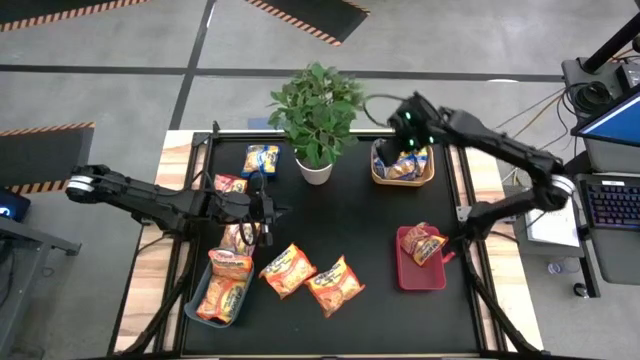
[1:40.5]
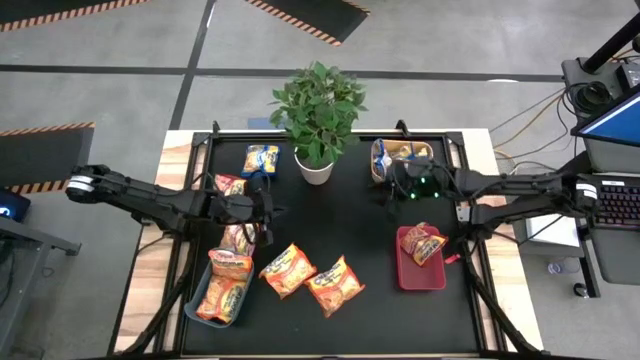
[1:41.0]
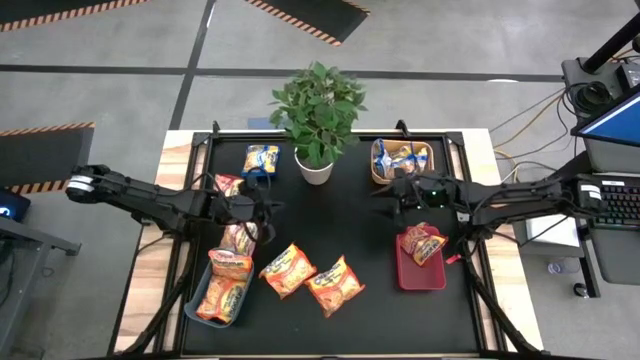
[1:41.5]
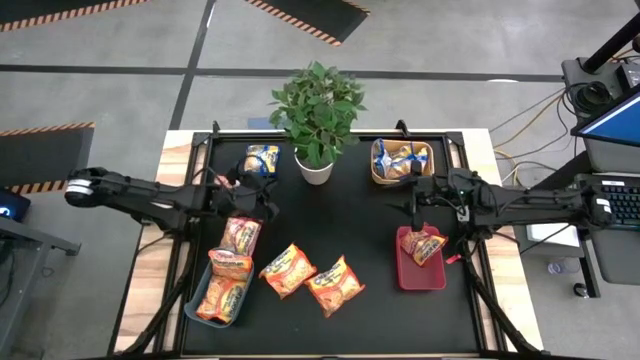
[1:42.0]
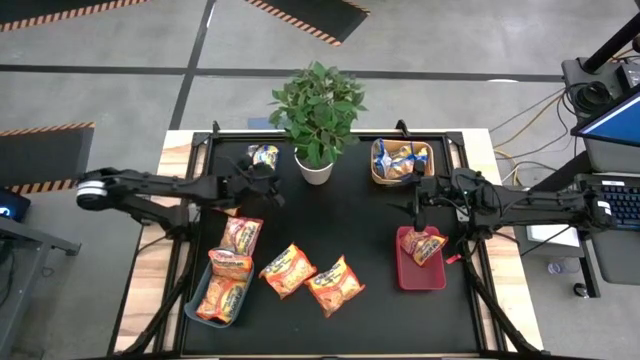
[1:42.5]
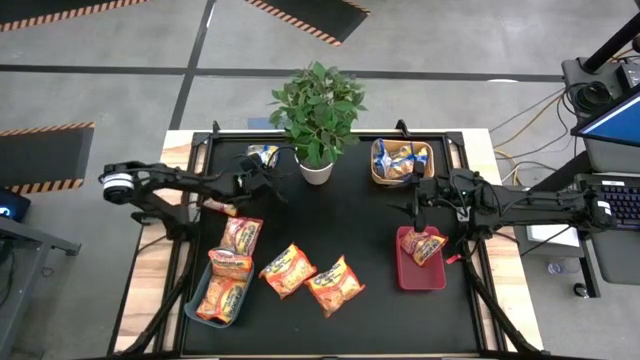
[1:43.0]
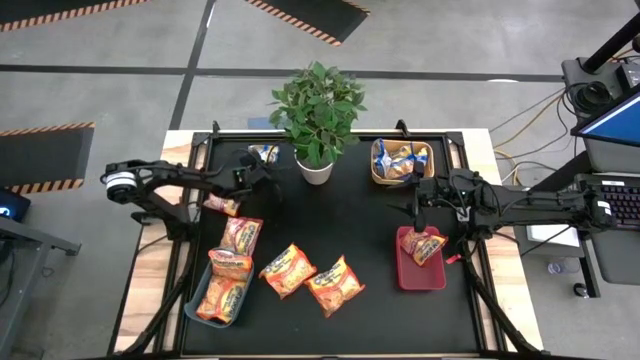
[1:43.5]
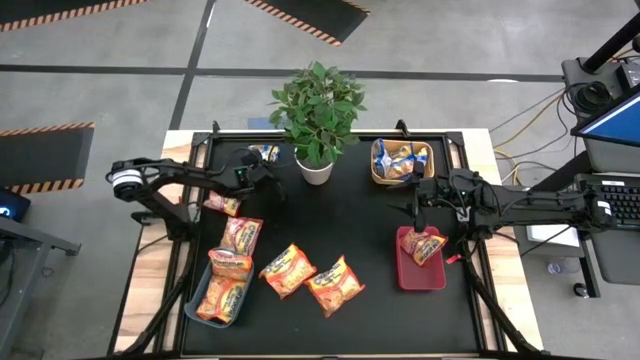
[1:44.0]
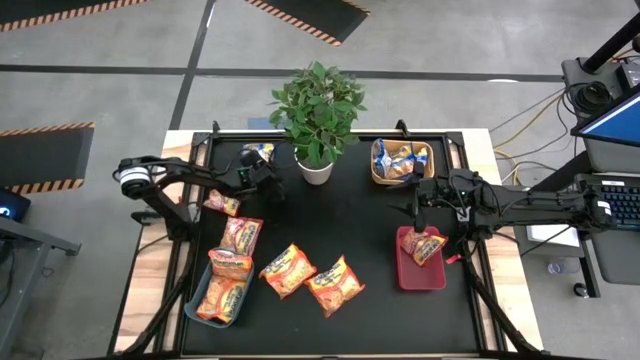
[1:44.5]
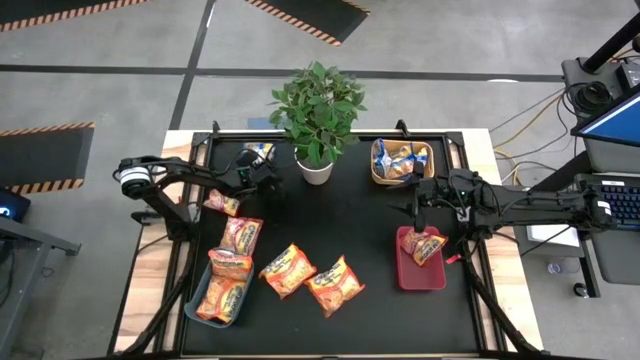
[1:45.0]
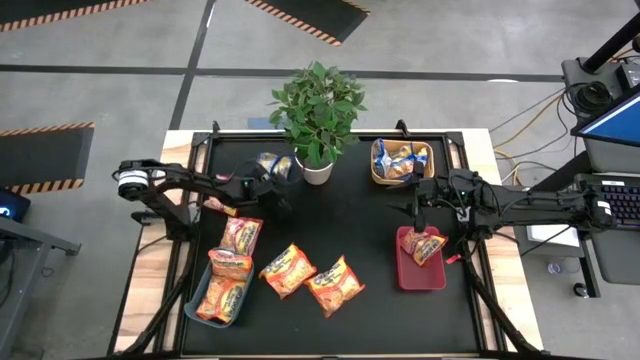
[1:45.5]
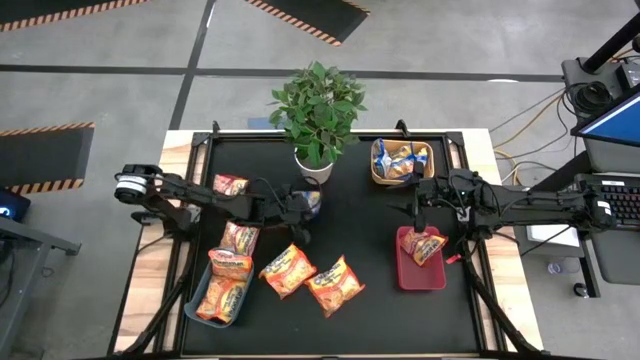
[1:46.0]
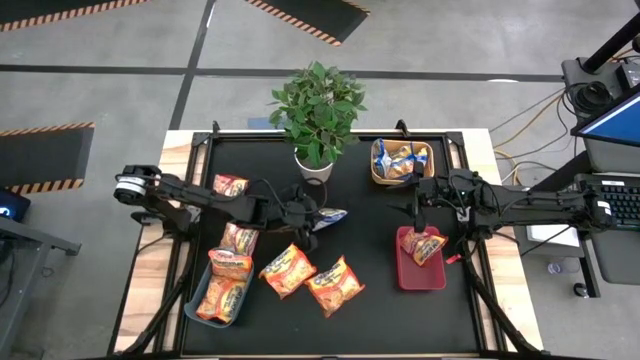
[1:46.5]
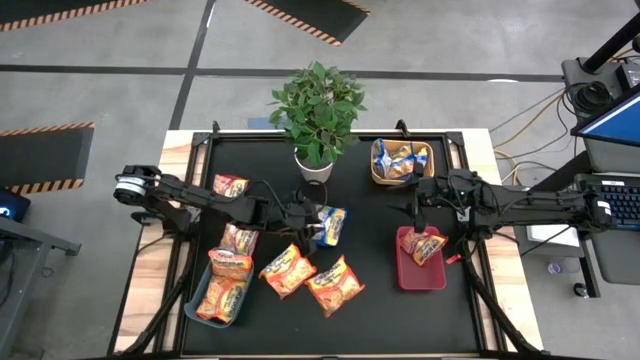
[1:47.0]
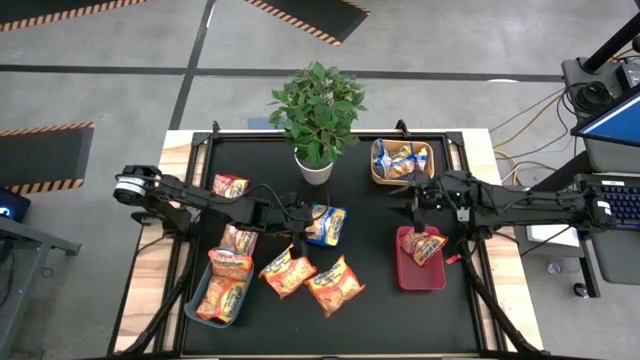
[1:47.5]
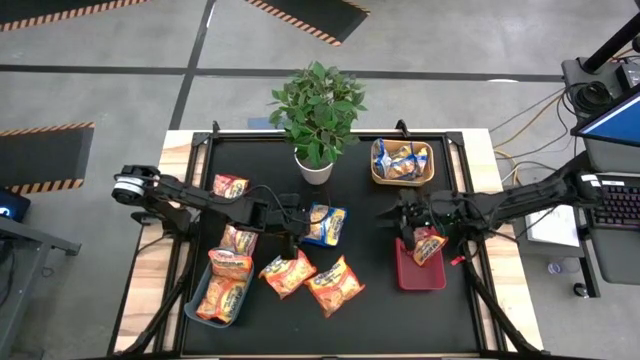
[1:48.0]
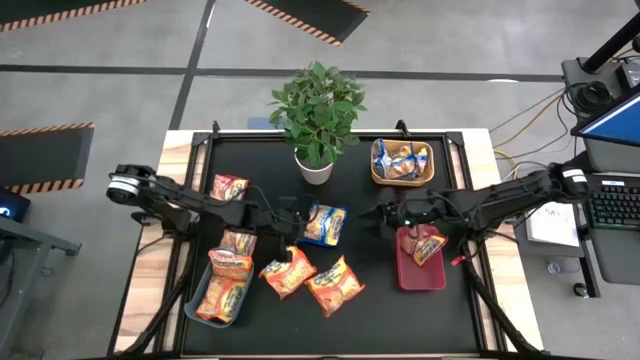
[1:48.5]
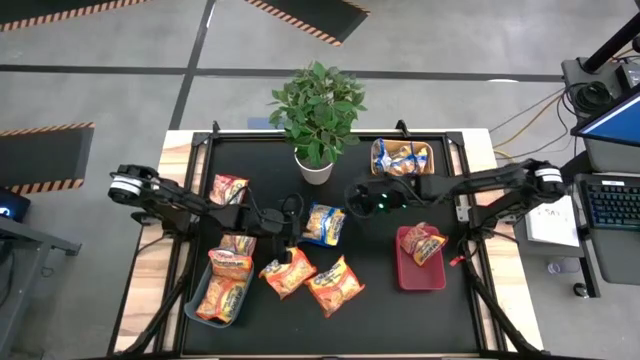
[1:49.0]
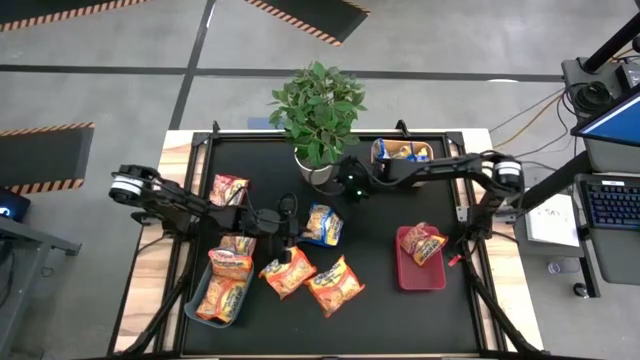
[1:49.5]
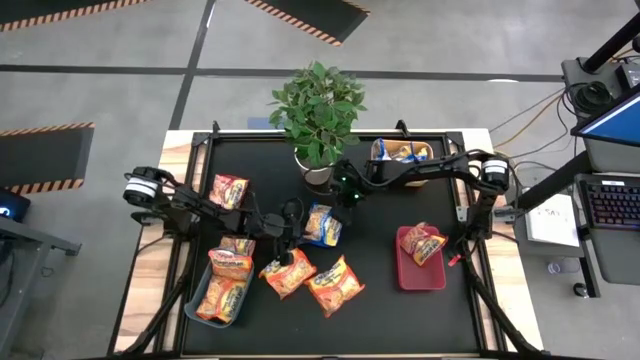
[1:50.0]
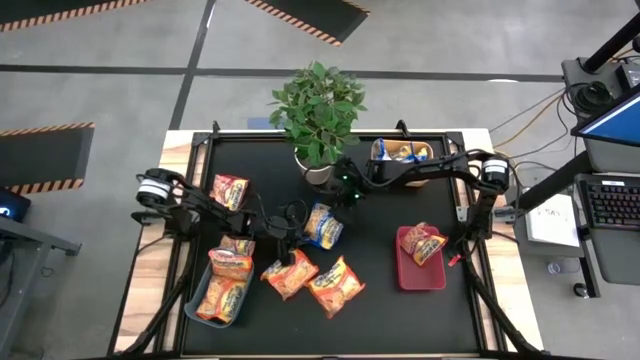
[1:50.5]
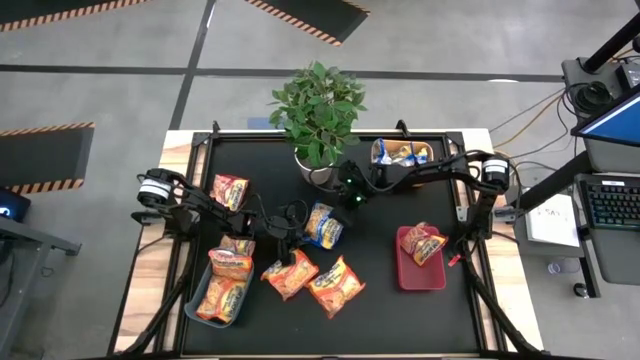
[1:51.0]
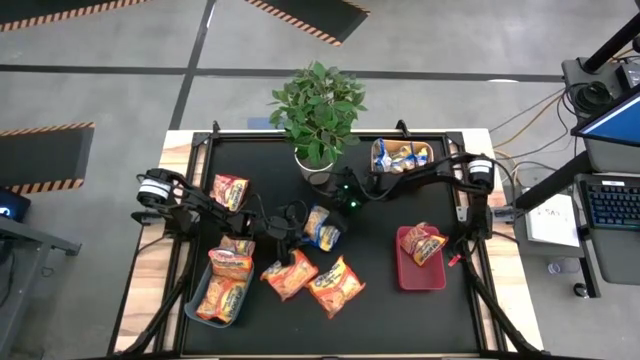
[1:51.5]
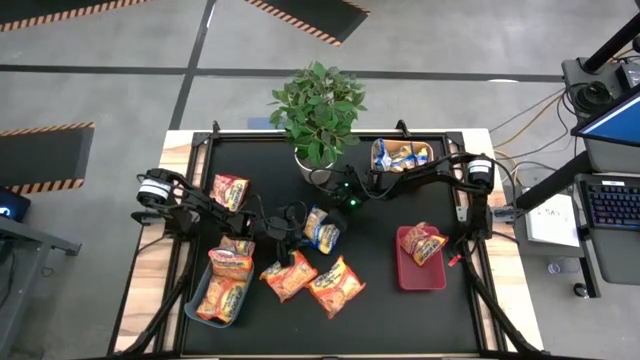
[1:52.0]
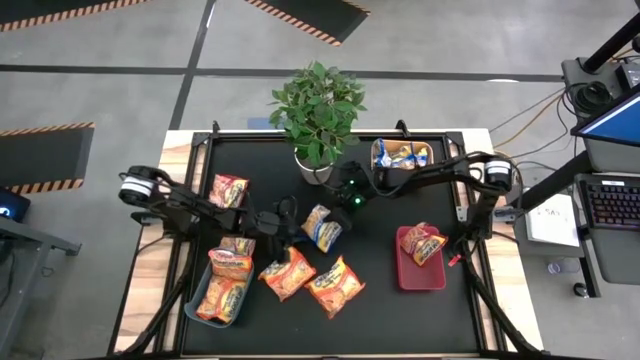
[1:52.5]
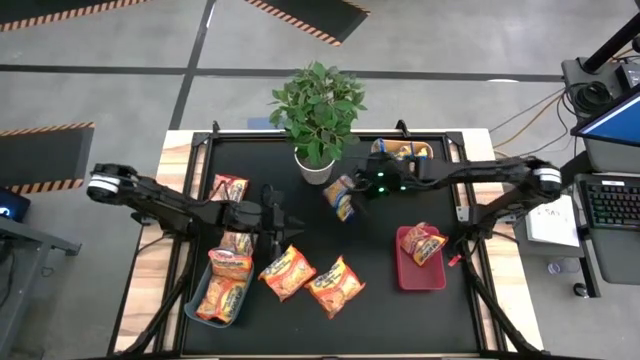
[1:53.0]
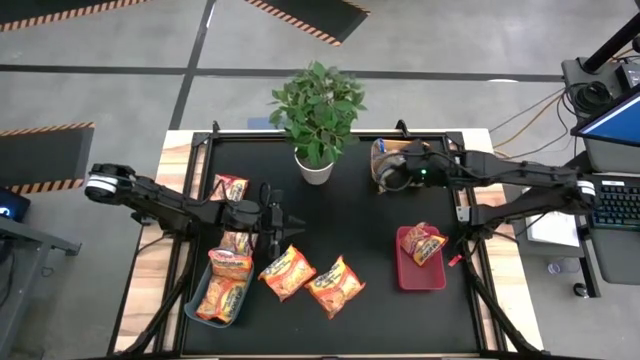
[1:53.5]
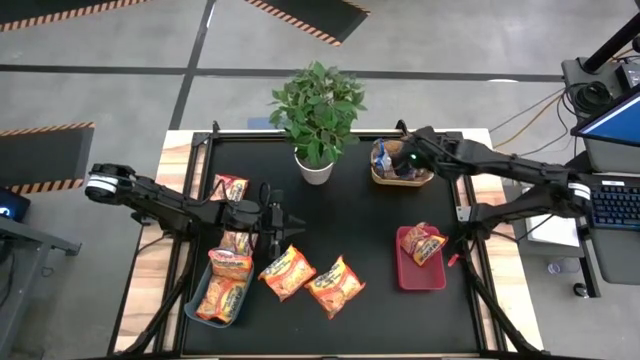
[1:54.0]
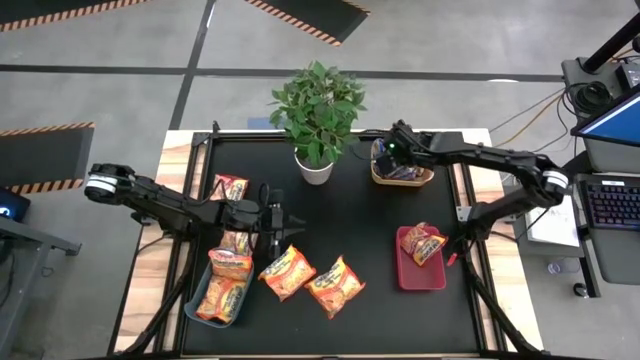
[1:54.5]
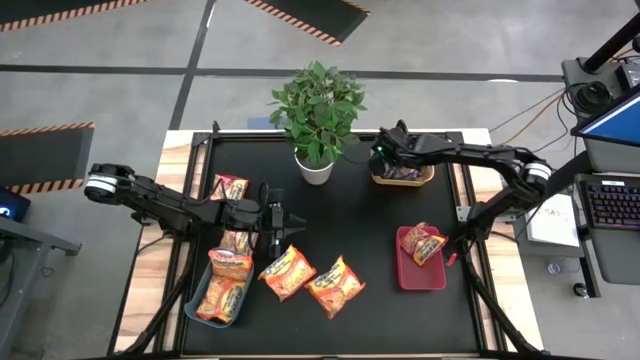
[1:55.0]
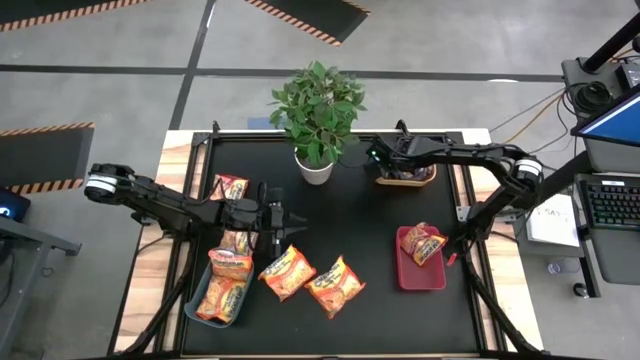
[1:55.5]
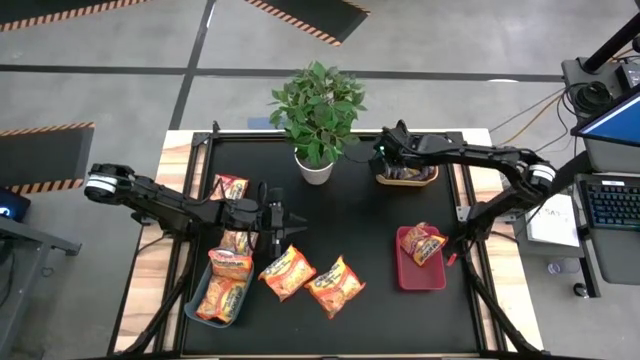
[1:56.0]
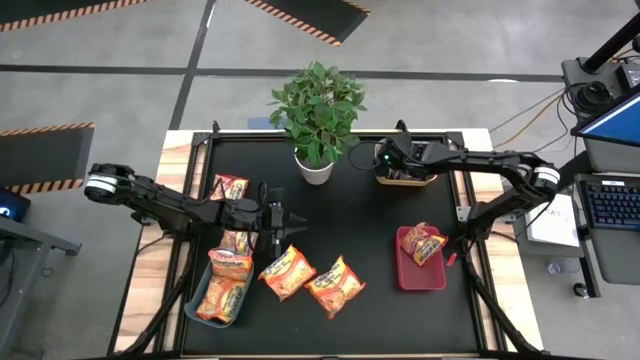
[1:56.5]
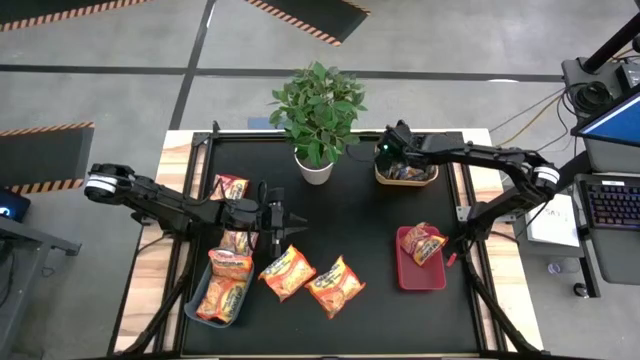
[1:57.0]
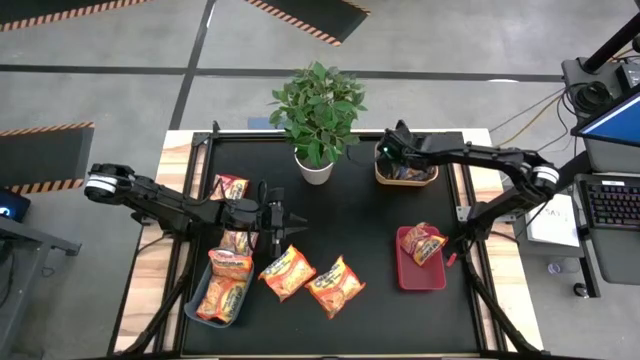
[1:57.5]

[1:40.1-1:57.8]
Task: Sort Maruchan noodles
Put the blue noodle pack into the pink bin

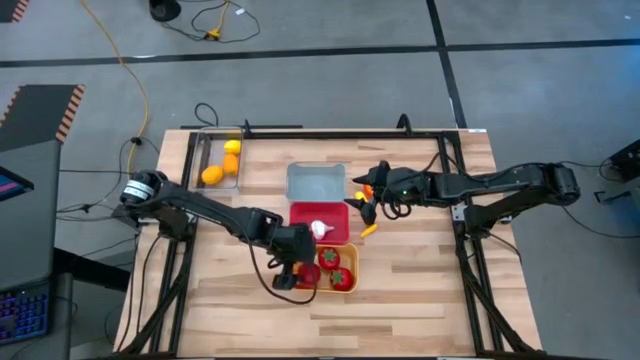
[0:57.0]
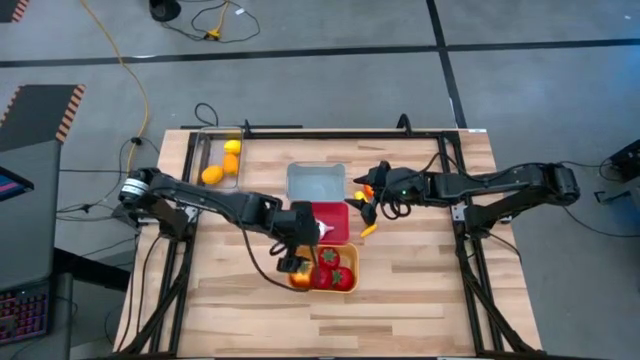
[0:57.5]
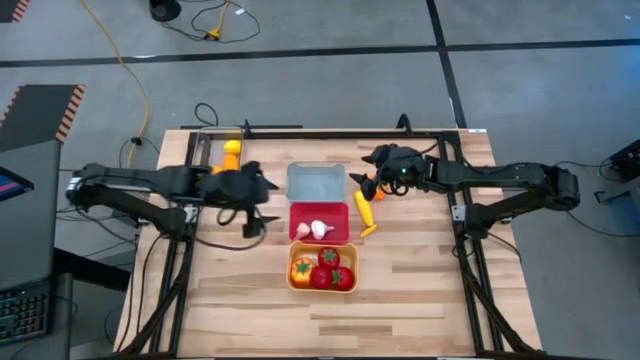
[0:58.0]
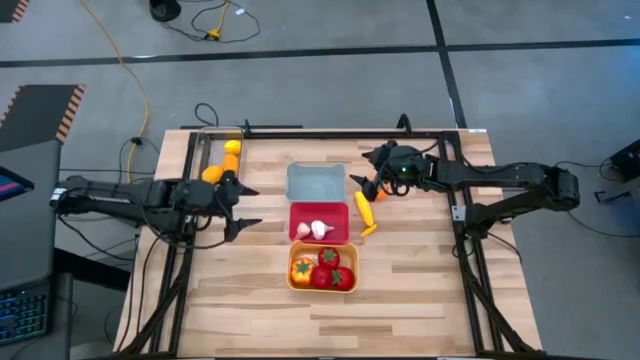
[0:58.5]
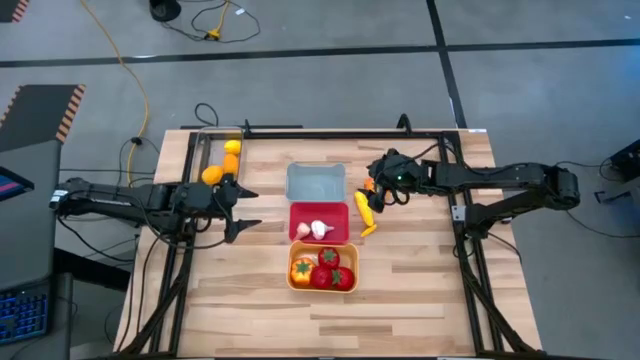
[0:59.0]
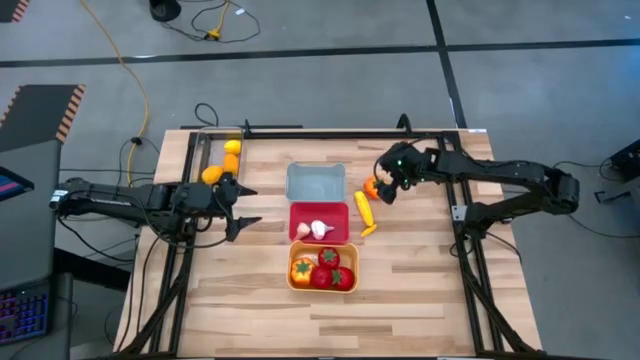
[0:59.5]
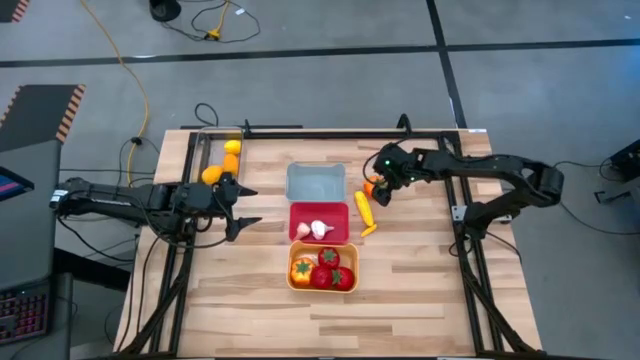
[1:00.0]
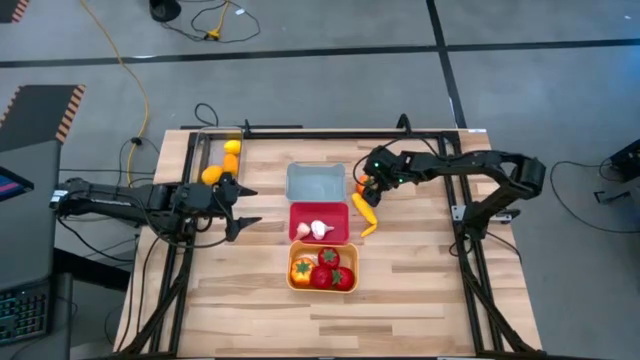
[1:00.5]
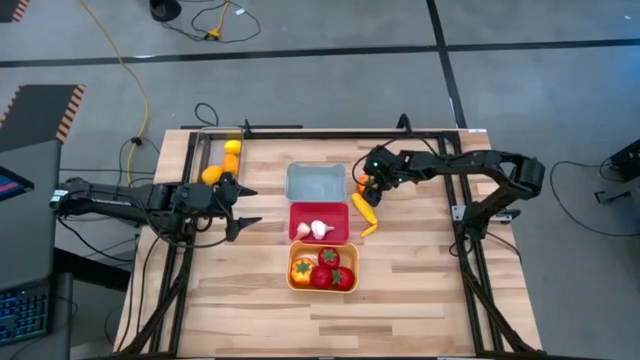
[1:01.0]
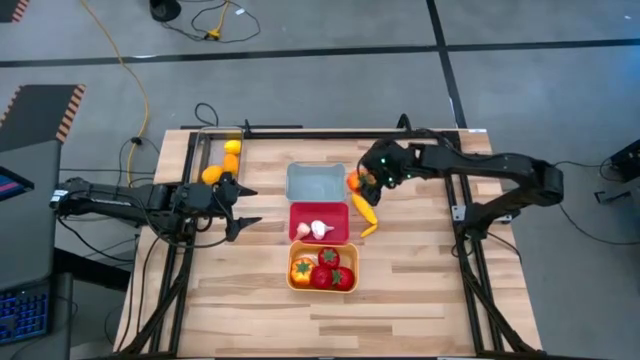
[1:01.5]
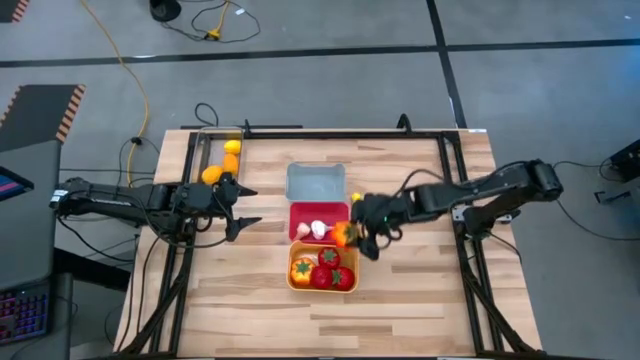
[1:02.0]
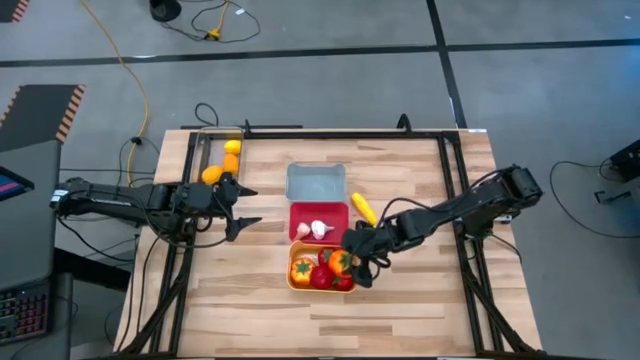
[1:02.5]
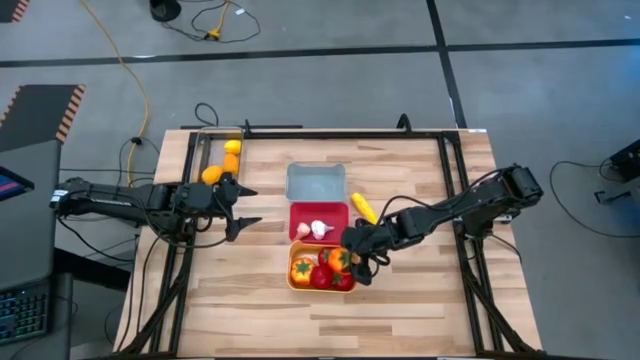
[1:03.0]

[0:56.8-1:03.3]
Task: Sort produce into baskets
Put the orange tomato into the yellow bin
